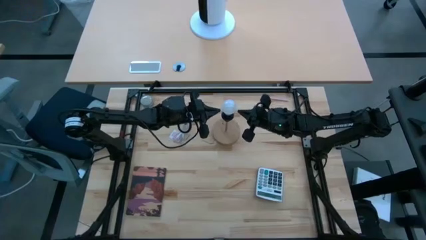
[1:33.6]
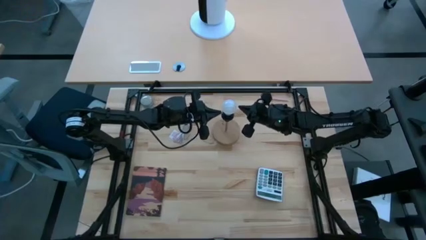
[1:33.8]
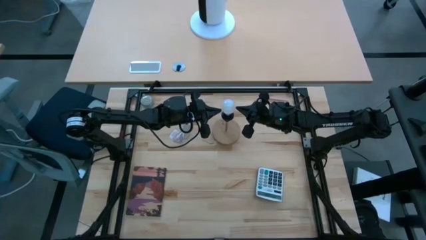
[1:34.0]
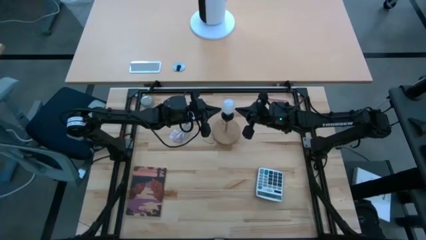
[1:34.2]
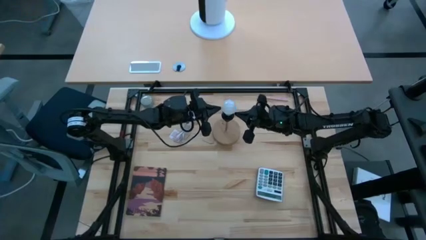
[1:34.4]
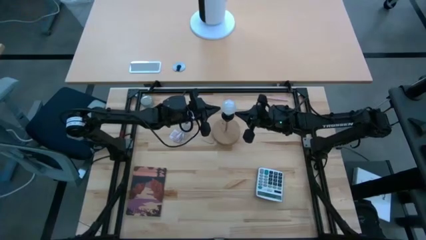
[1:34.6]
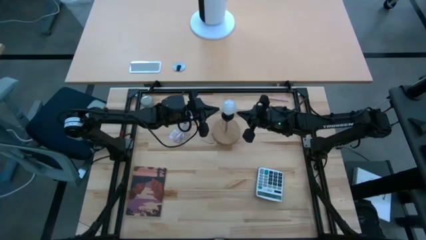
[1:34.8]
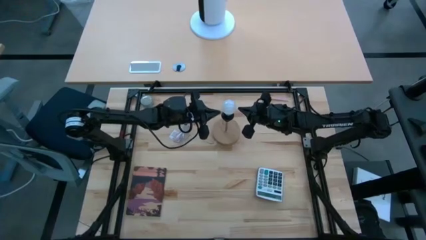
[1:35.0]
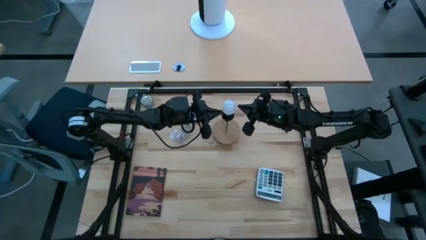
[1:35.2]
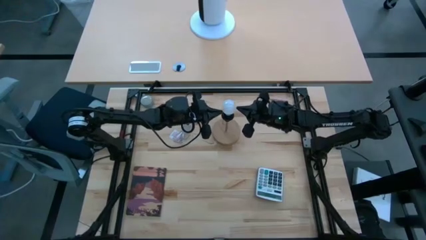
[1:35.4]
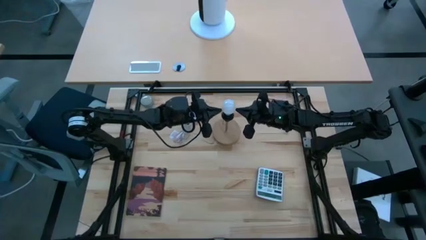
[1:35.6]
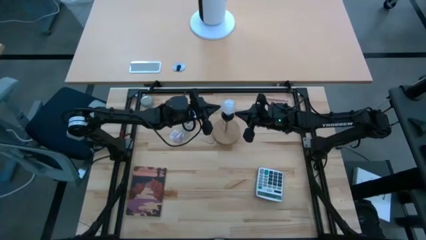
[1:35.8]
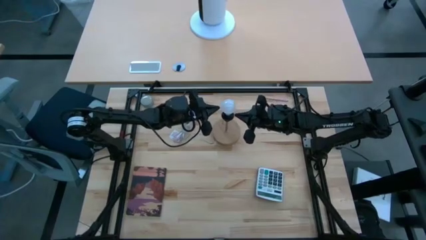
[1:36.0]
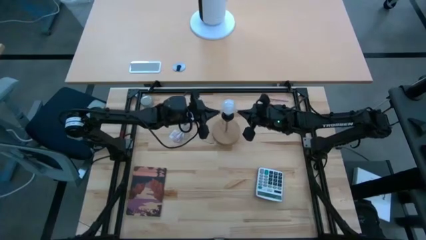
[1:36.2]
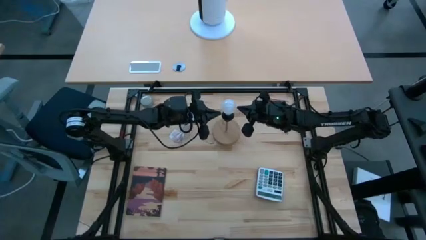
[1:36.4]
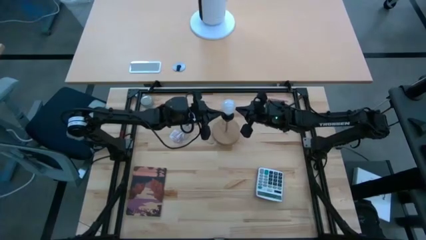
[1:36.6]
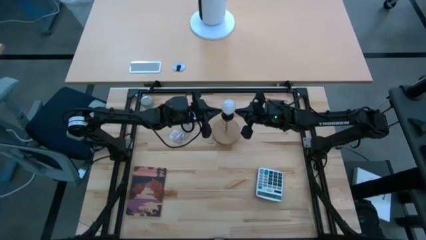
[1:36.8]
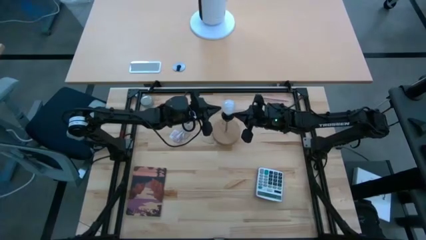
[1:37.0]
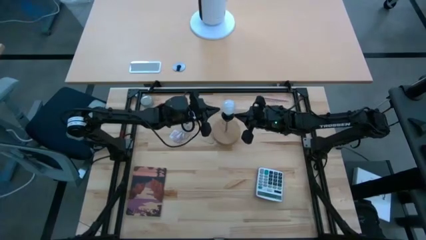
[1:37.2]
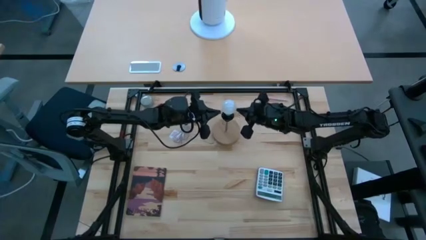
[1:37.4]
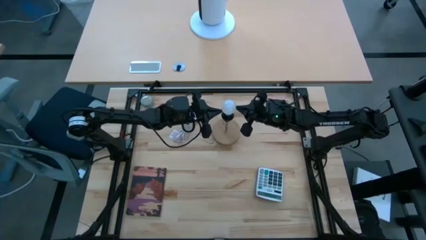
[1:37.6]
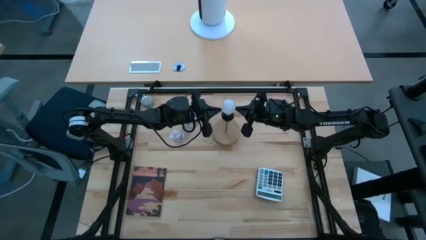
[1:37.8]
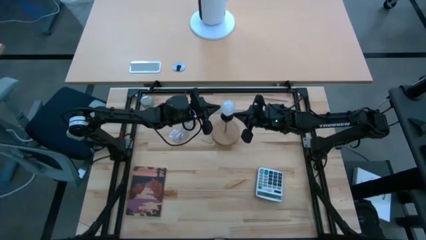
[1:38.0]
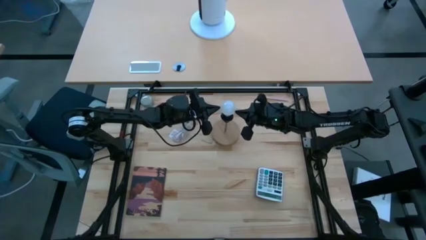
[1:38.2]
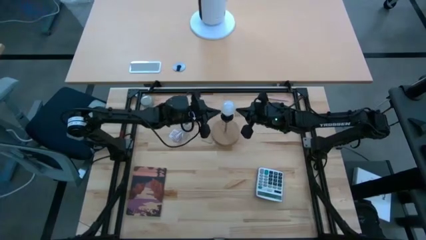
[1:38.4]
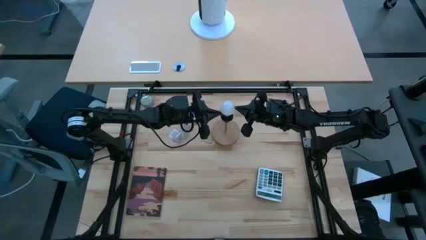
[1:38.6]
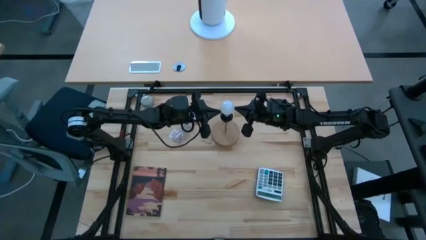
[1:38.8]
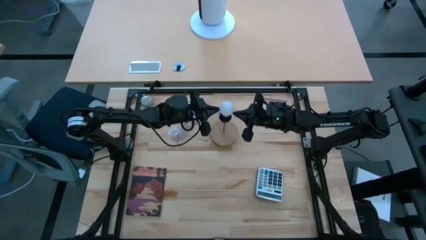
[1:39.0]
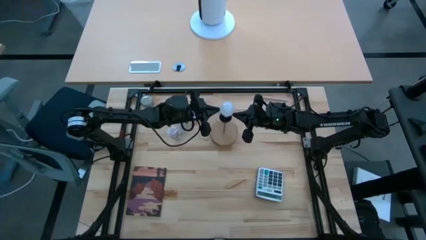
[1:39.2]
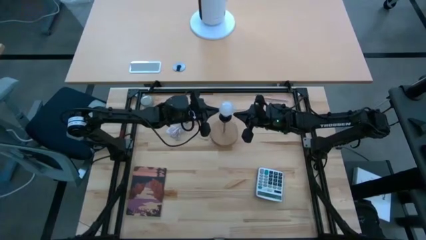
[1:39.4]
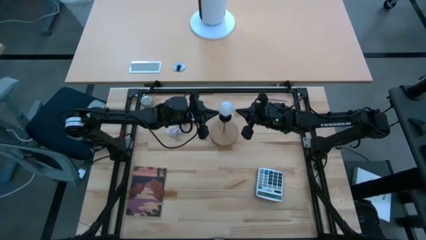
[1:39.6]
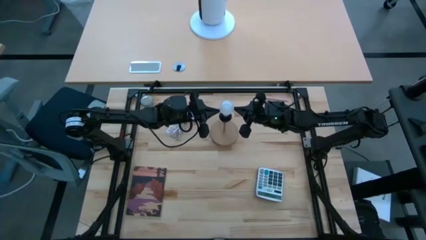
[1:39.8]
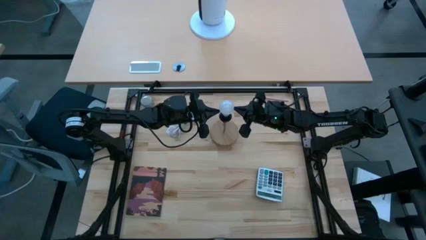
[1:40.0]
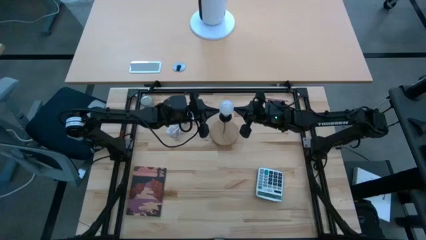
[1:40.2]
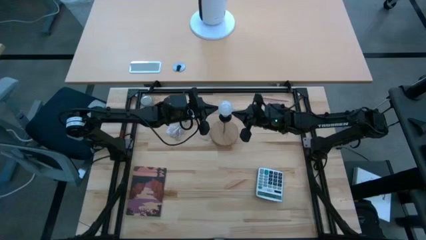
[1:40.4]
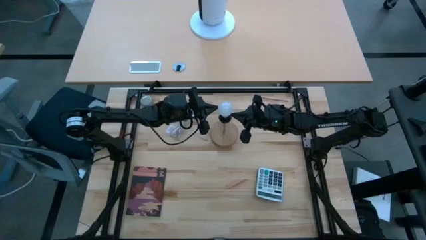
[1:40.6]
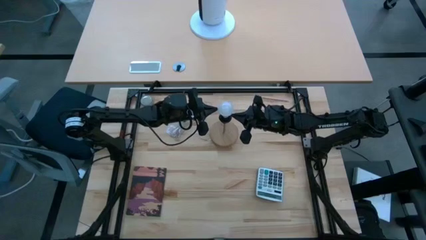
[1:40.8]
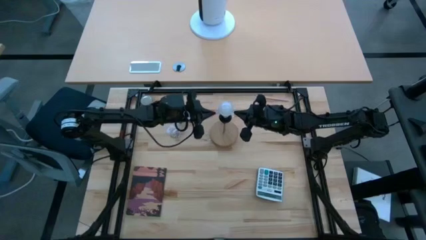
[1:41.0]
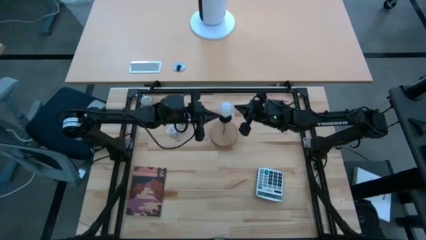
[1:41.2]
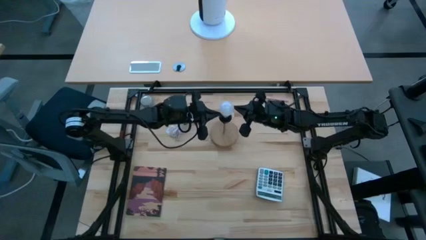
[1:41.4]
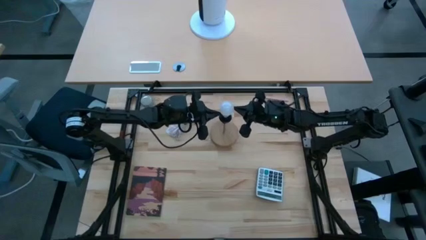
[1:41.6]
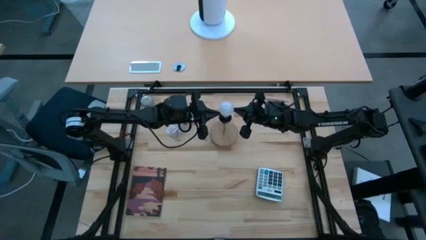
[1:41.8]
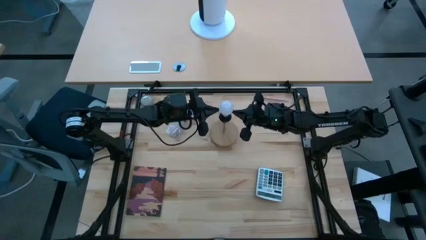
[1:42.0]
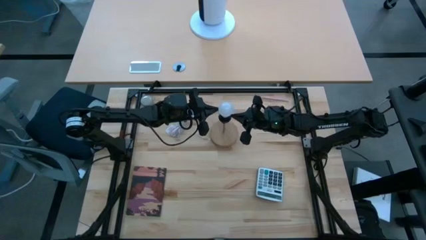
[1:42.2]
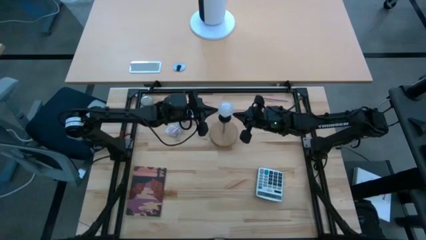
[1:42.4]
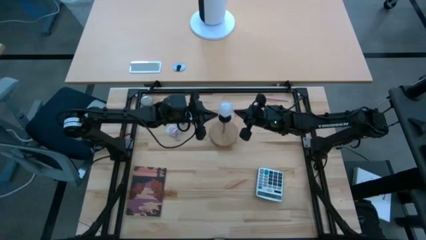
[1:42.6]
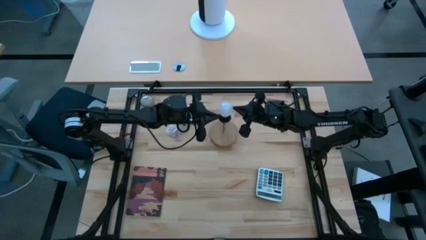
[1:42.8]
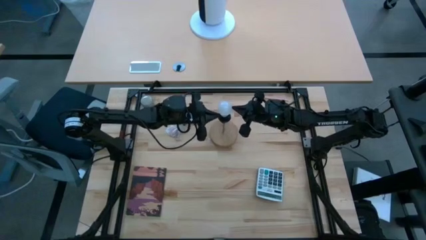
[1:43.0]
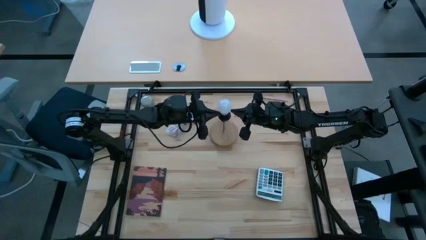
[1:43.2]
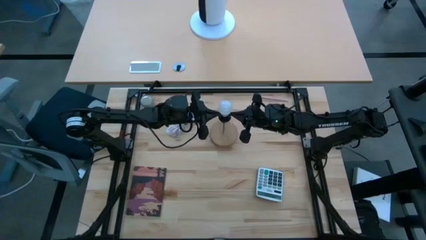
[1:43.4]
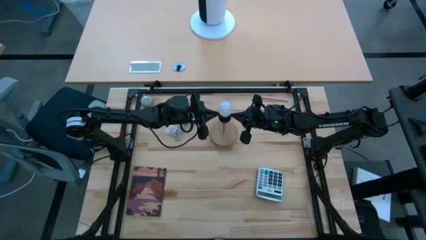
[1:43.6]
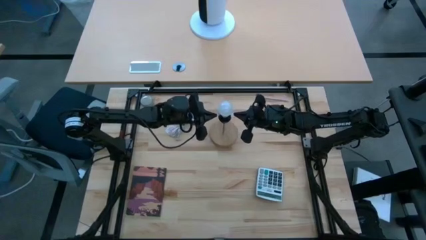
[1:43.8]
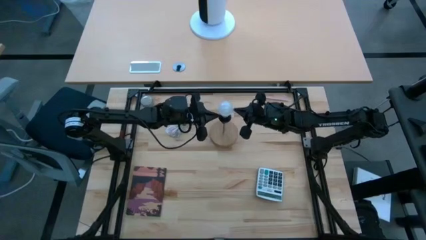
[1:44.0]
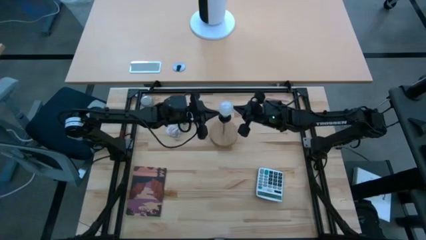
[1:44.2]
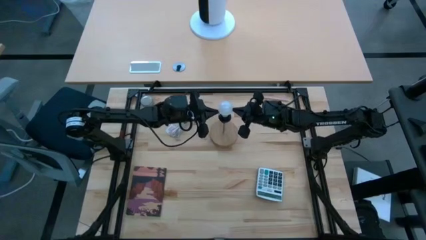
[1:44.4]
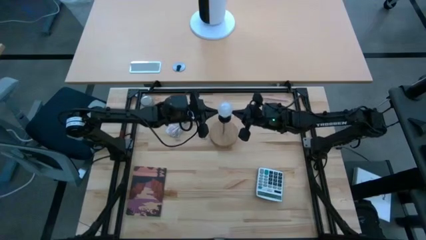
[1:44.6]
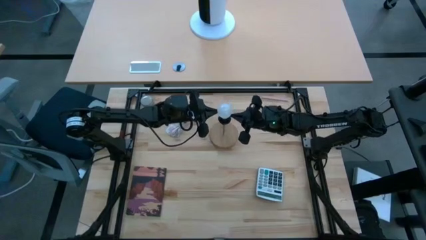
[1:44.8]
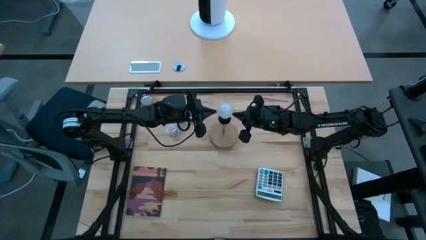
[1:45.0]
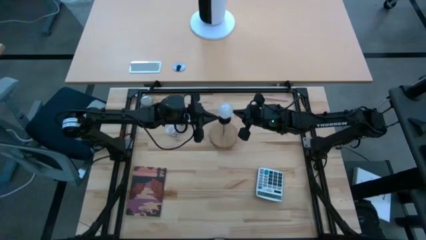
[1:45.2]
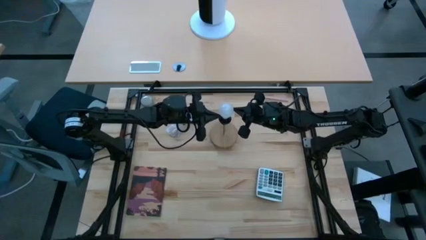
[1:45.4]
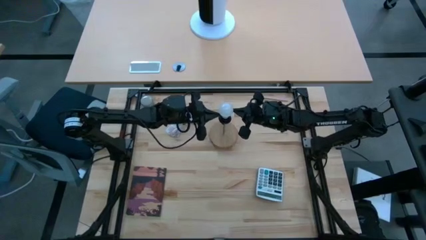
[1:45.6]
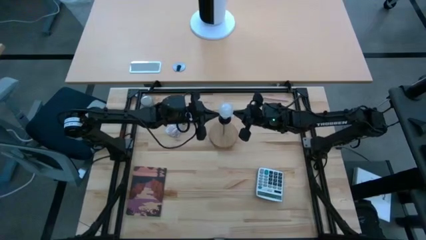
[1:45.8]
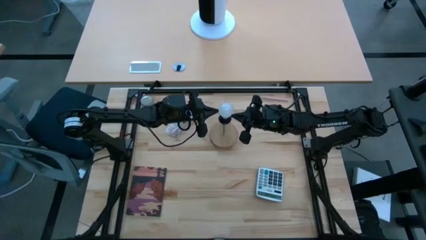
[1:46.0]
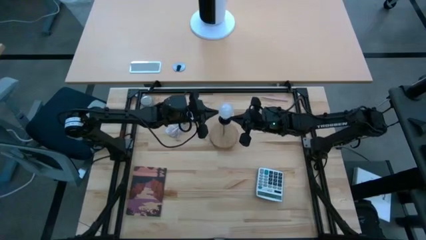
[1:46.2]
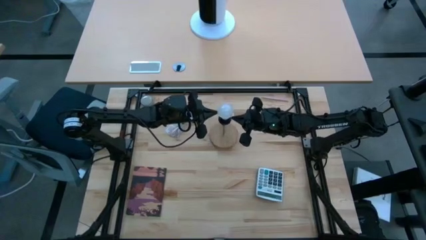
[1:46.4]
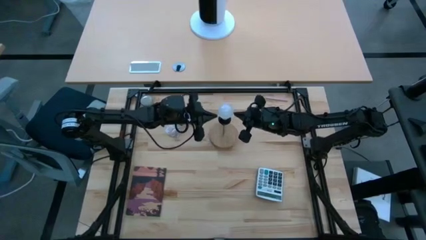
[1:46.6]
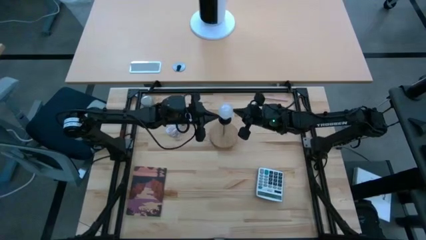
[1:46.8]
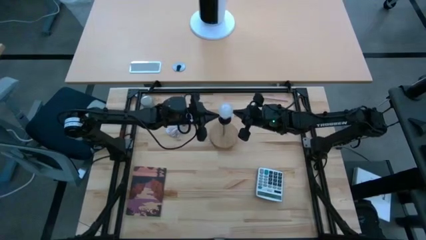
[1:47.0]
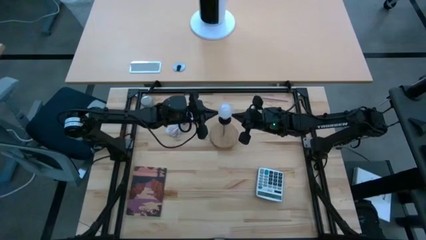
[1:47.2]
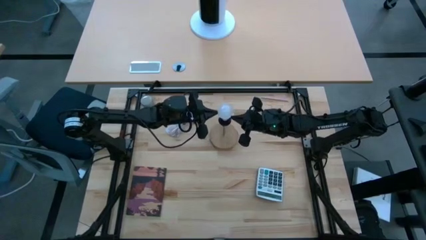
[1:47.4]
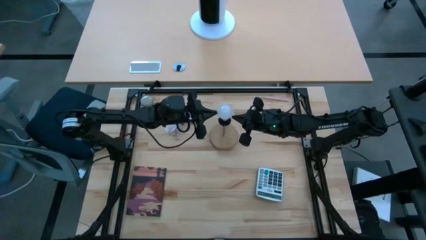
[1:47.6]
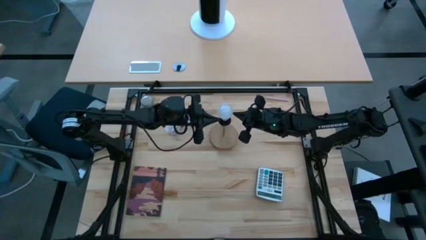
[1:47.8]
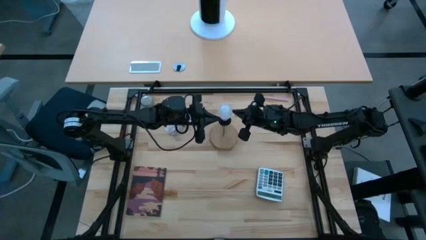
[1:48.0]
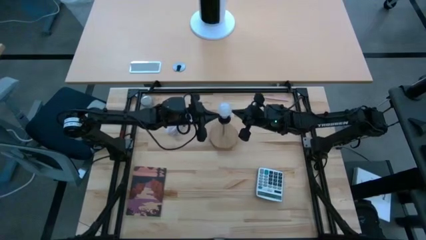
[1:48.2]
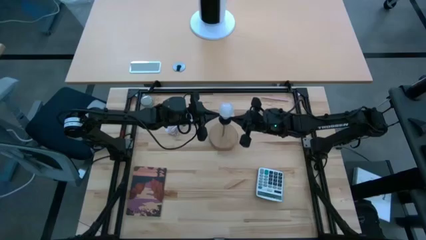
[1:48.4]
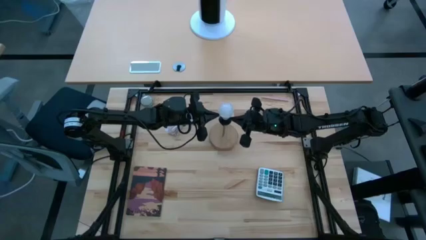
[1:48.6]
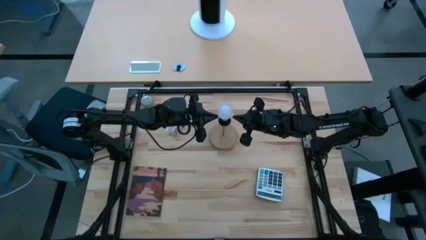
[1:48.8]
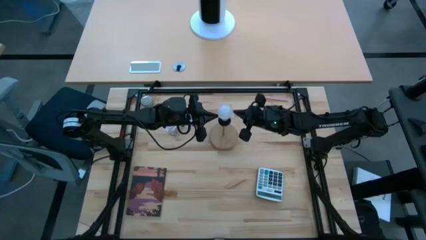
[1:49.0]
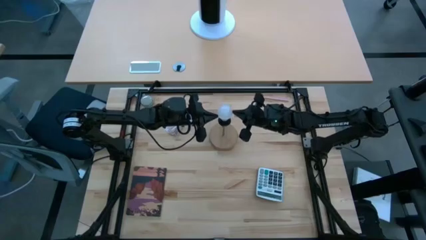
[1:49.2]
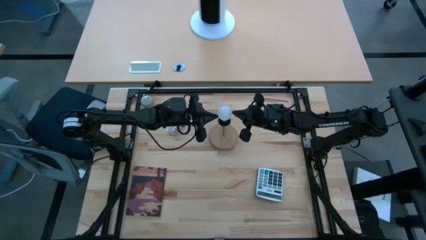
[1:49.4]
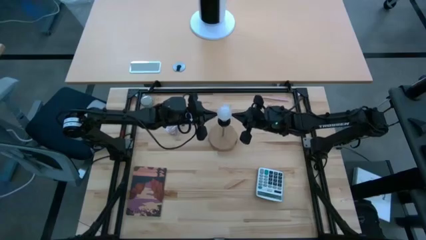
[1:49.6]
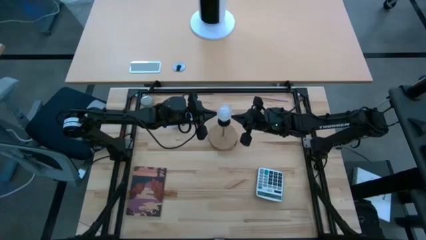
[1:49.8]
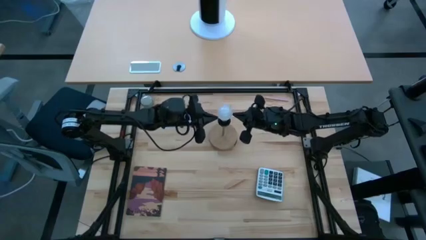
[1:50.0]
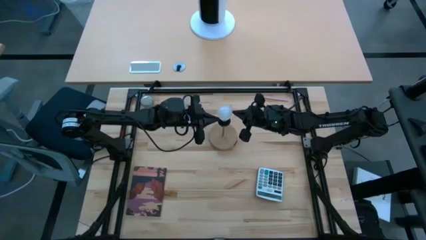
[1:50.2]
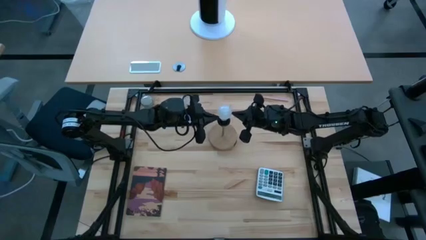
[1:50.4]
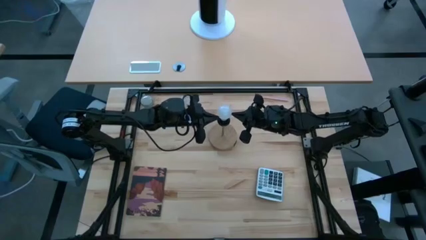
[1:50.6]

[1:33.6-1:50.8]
Task: Screw lightbulb
Insert the lightbulb into the lamp
